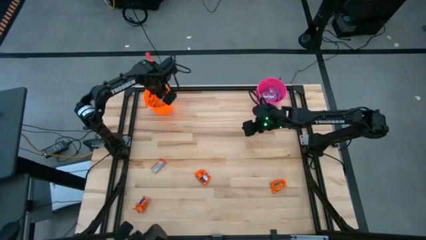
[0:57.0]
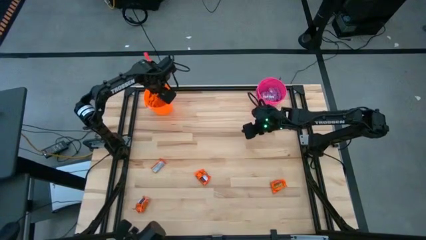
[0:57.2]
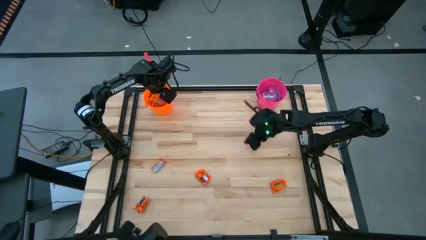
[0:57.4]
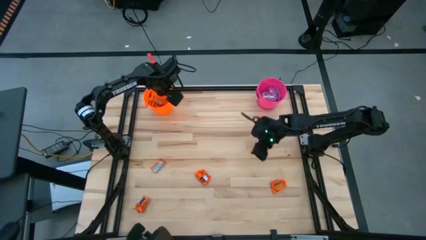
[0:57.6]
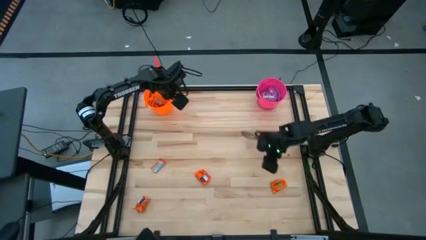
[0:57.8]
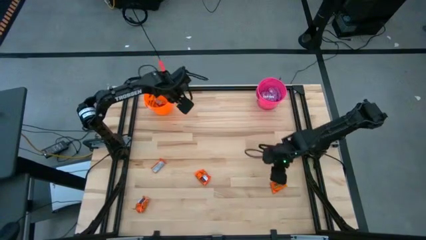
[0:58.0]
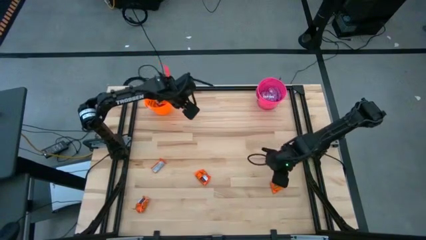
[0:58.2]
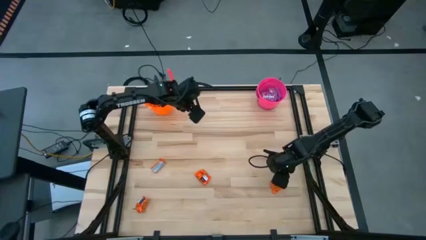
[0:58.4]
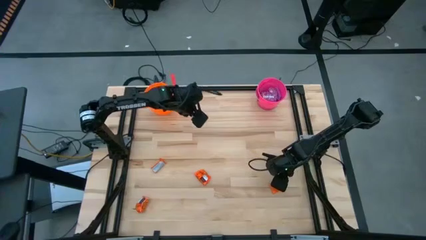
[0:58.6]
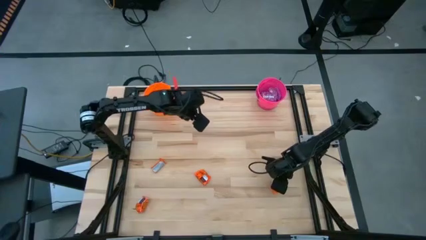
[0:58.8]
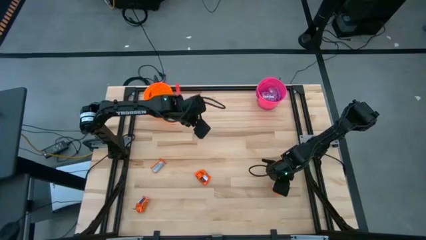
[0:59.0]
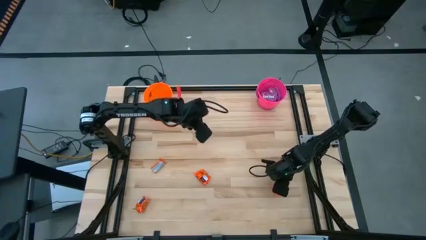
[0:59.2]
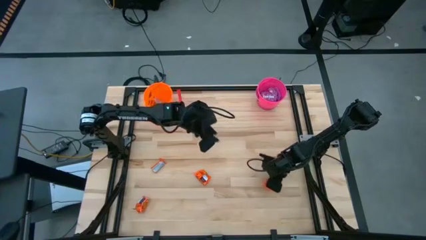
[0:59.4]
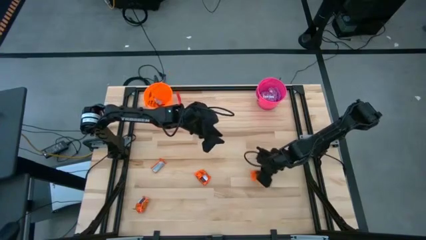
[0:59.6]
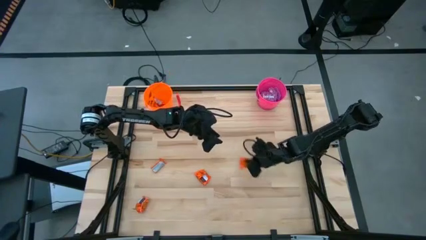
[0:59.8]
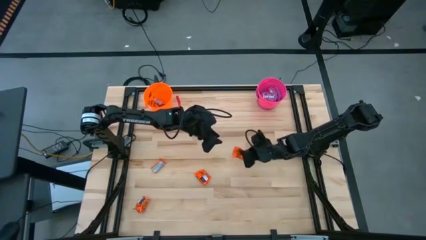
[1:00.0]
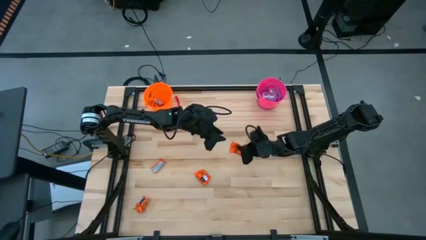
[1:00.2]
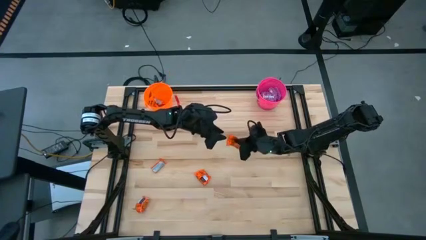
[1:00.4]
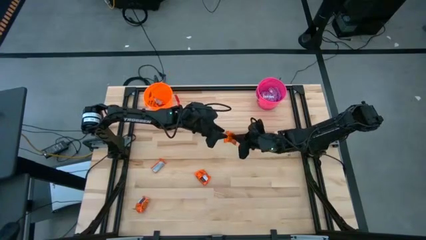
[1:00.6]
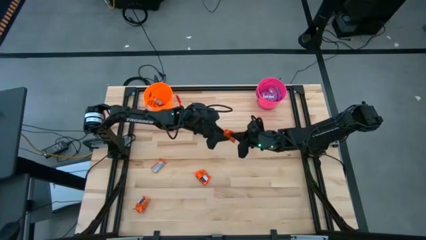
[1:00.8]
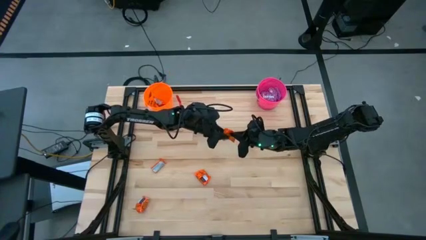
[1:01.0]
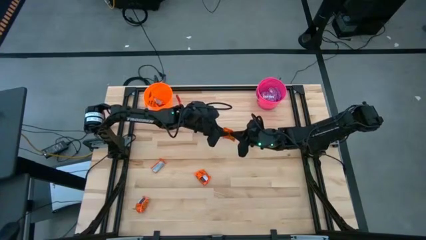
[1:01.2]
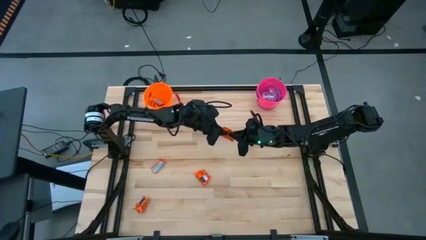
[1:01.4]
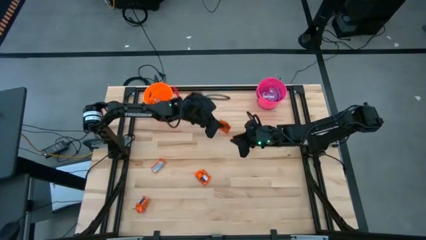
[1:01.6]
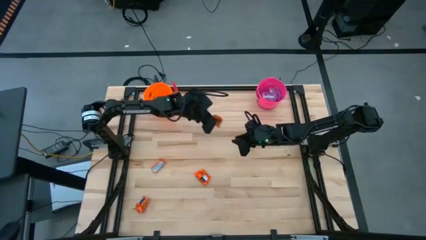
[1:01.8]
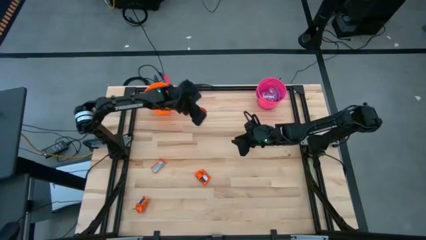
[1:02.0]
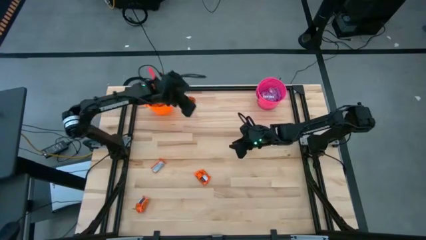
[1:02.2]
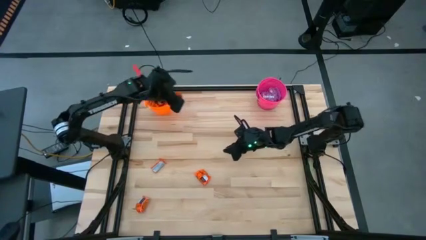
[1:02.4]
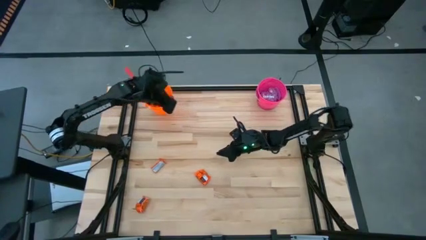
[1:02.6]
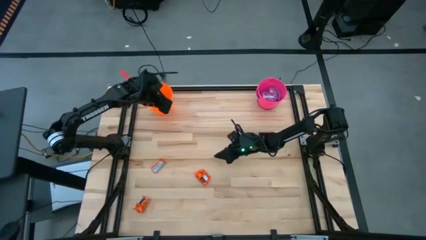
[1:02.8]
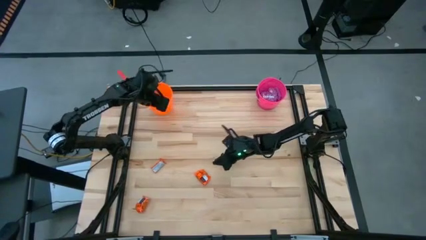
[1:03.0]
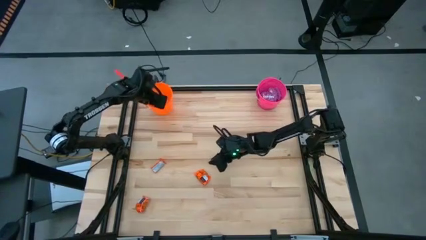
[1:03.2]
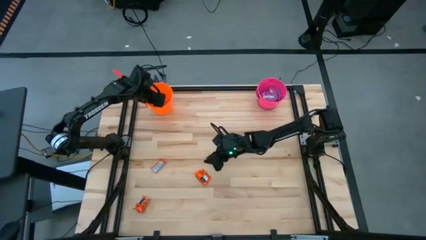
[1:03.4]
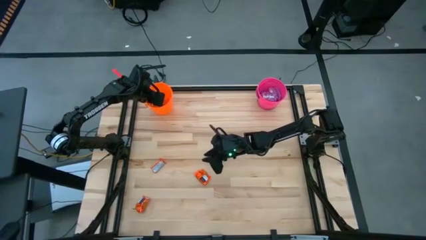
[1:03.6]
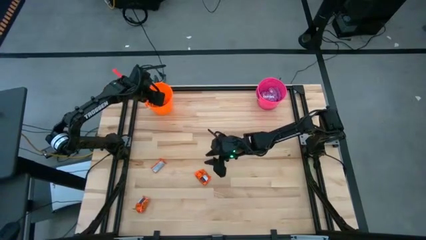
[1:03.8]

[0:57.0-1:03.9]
Task: Sort candy by brand, put in halloween buckets
Put the orange chocolate bar into the orange bucket

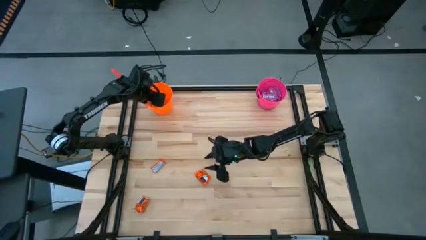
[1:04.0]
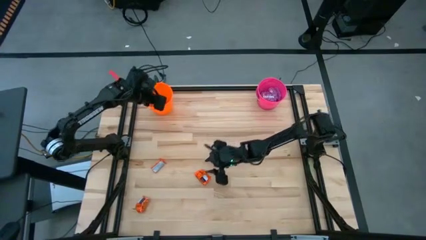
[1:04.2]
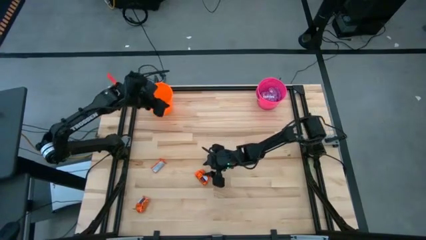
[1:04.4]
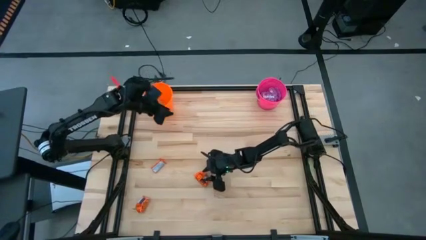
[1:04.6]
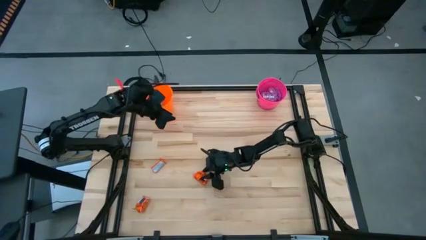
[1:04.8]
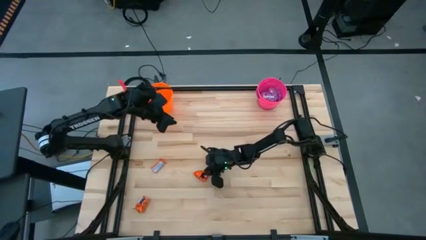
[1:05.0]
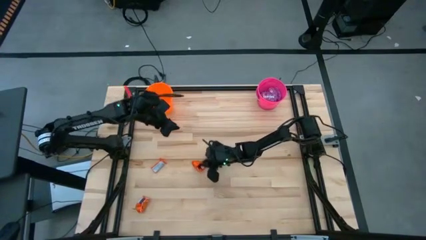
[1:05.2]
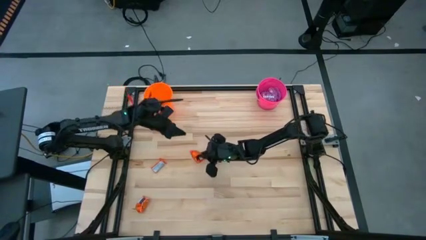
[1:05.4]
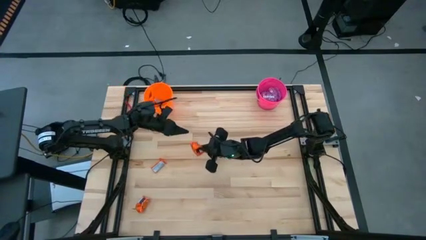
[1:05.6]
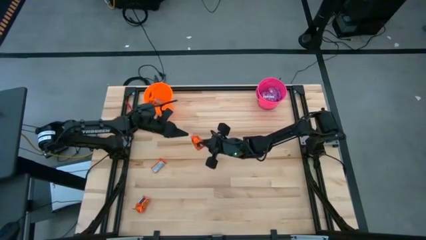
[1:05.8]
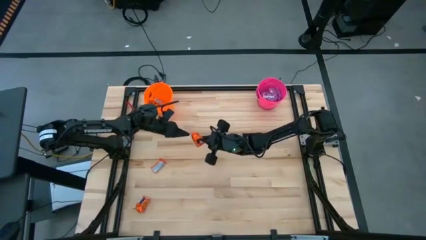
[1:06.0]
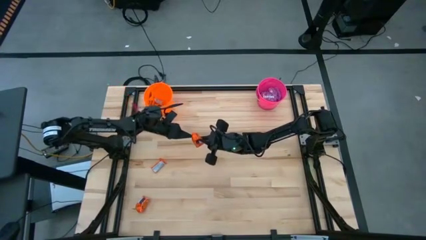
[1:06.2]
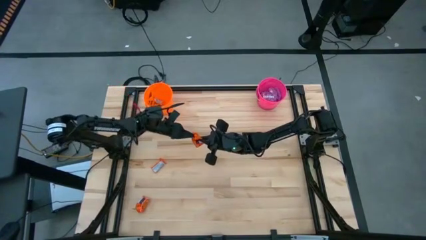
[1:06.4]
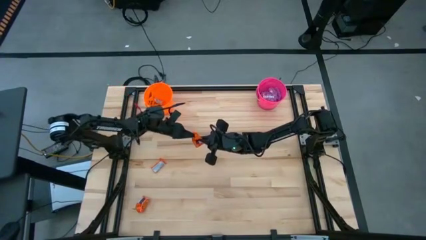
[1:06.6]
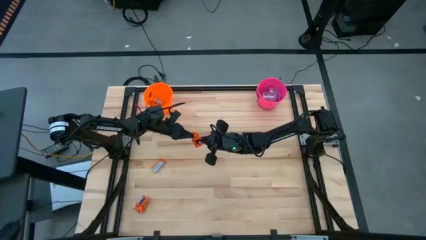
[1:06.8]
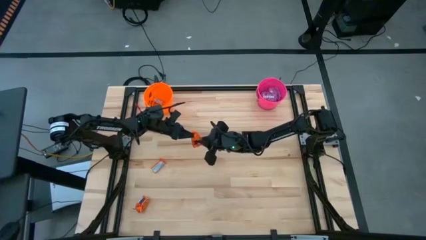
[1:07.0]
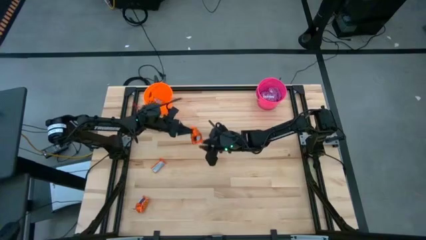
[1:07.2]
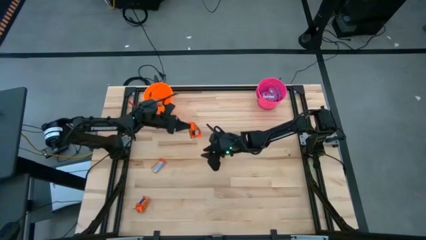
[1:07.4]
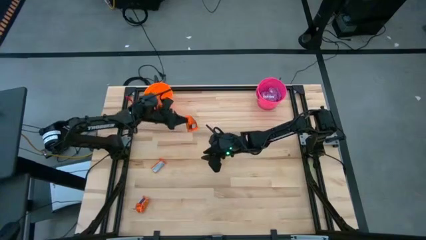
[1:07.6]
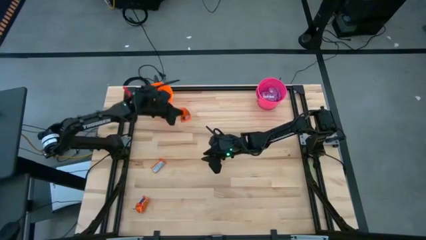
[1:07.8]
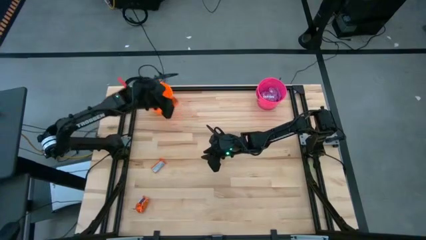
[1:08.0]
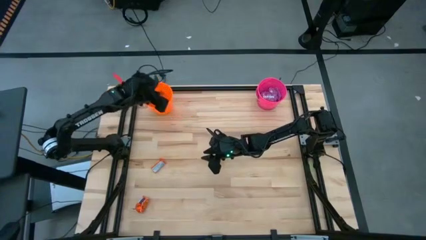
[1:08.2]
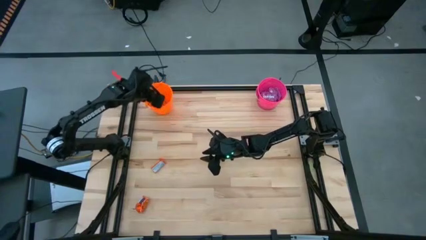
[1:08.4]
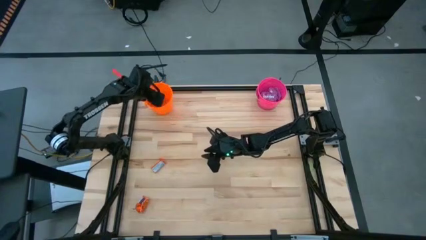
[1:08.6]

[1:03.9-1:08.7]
Put the orange chocolate bar into the orange bucket

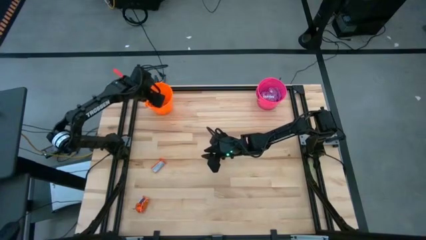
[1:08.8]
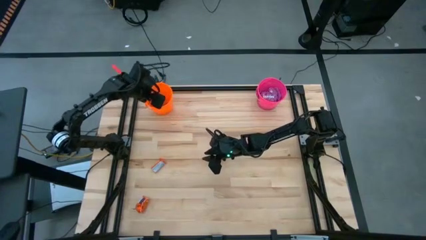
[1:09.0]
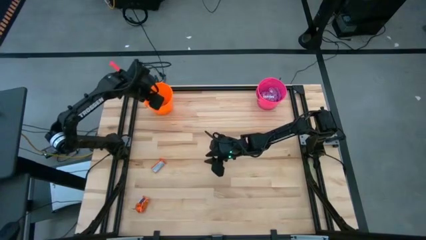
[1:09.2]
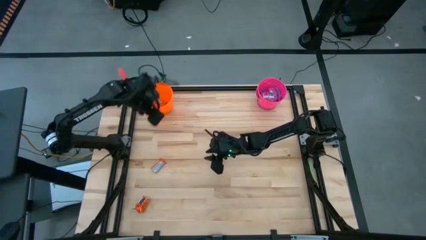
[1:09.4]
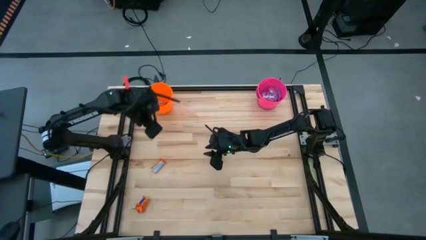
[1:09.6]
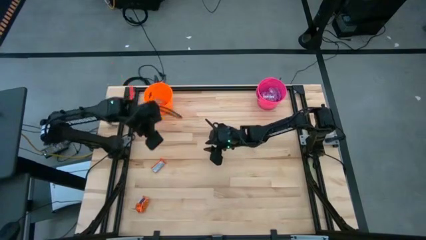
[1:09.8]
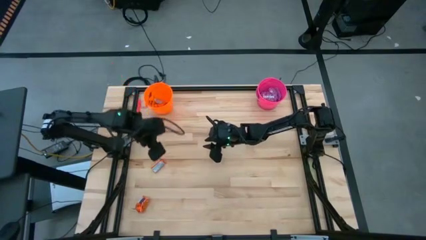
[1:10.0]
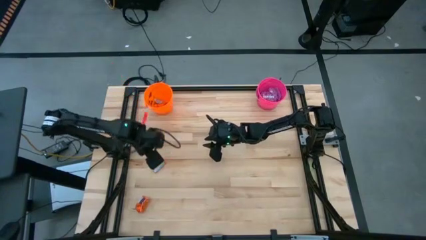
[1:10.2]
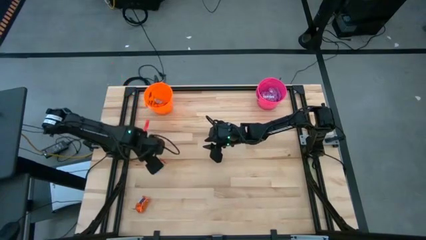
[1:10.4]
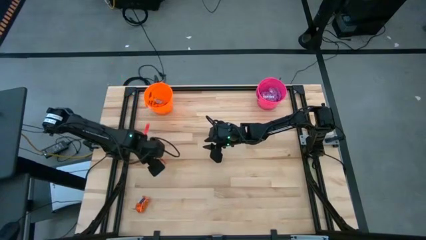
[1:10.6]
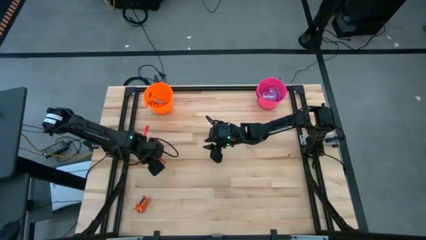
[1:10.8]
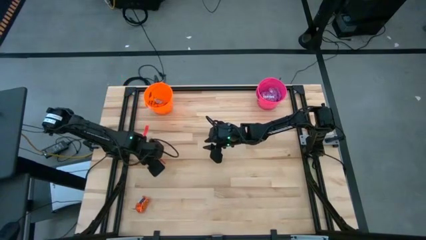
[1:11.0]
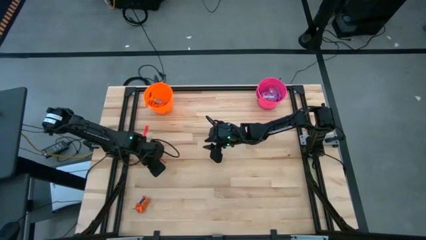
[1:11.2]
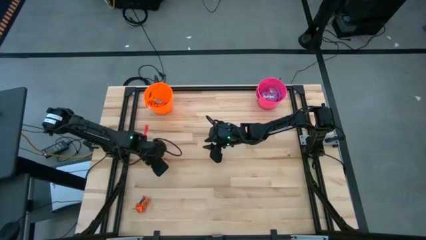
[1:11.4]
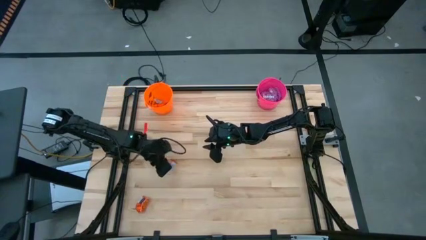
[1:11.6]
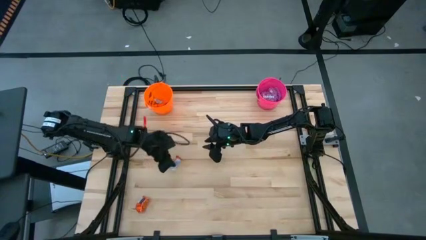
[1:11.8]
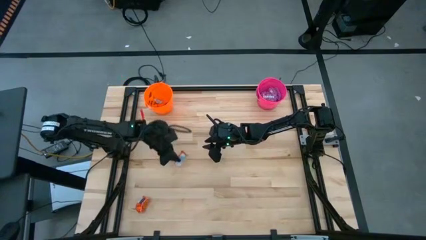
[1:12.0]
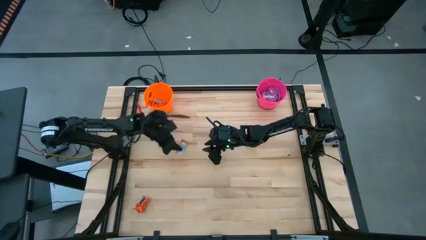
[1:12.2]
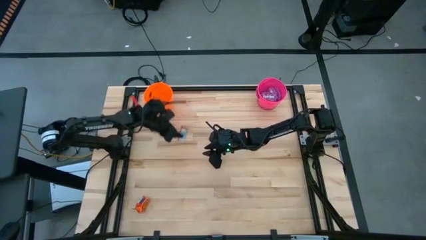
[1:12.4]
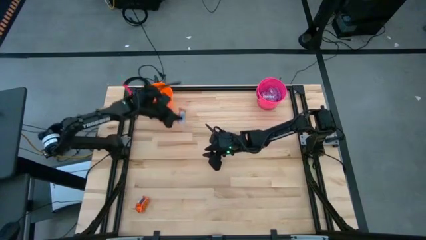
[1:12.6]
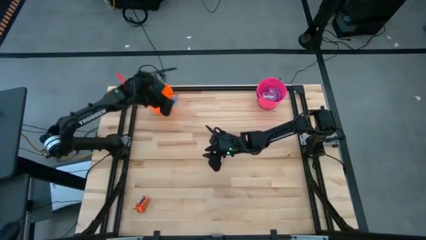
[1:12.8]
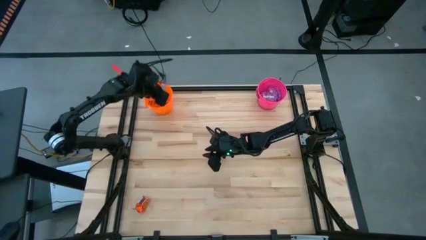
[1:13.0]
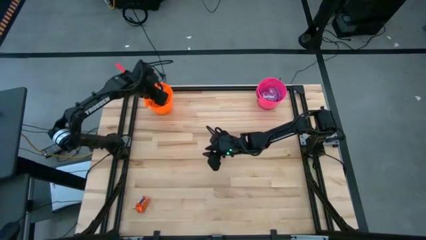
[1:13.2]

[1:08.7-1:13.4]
Put the orange chocolate bar into the orange bucket
